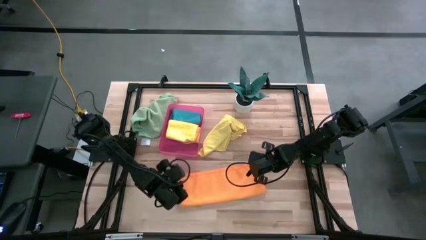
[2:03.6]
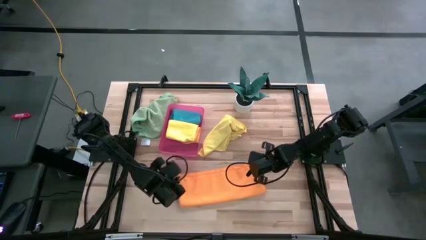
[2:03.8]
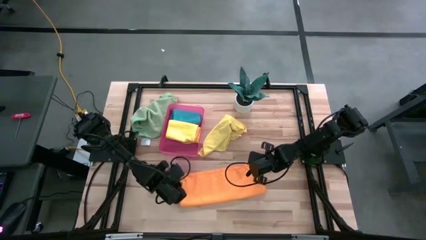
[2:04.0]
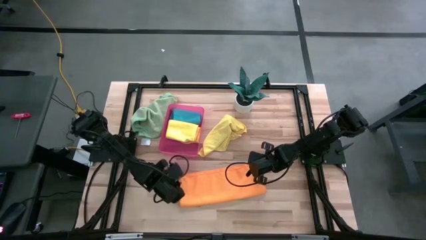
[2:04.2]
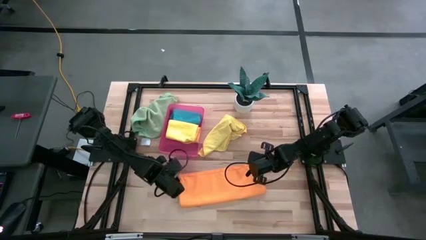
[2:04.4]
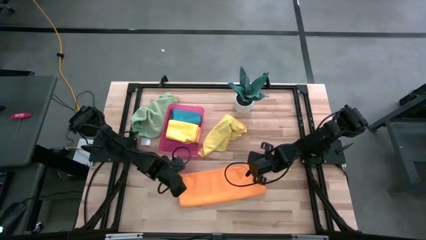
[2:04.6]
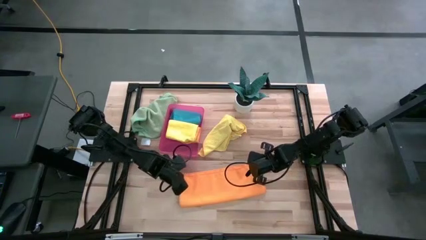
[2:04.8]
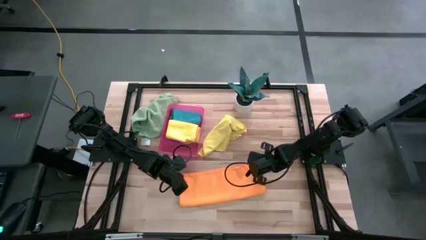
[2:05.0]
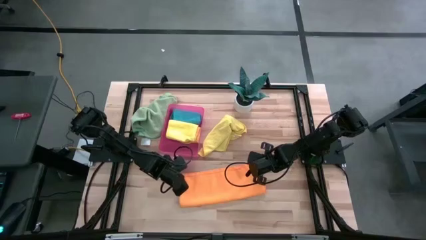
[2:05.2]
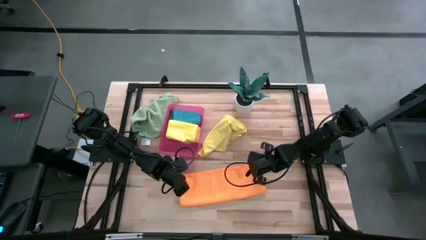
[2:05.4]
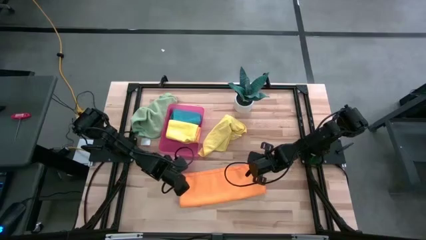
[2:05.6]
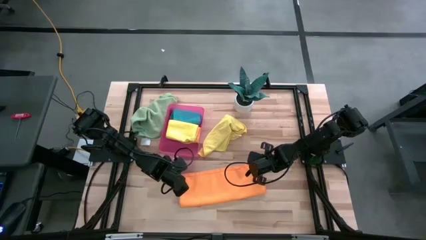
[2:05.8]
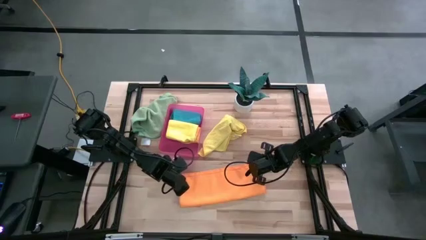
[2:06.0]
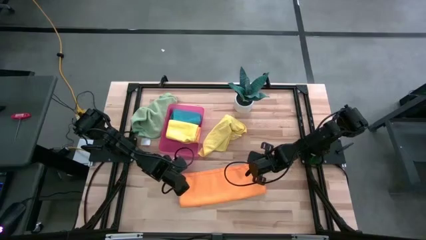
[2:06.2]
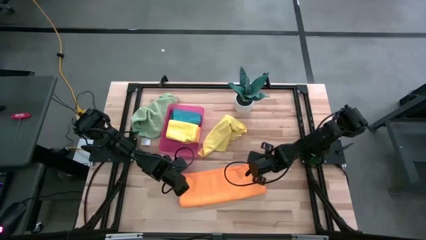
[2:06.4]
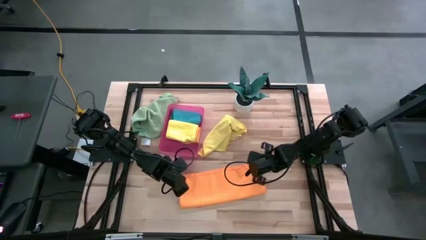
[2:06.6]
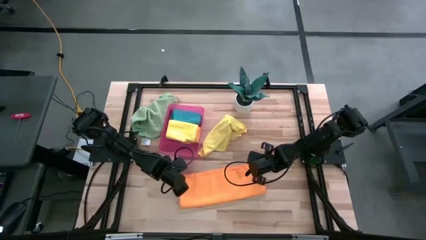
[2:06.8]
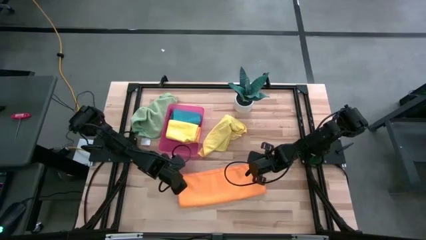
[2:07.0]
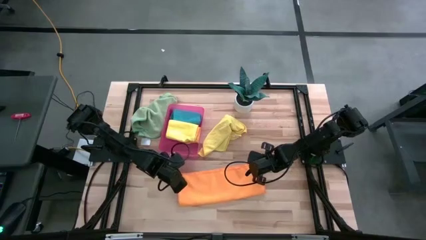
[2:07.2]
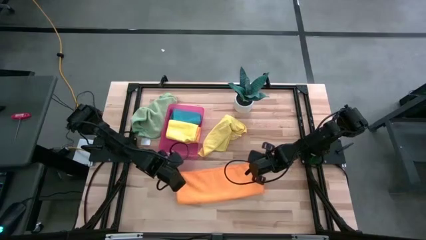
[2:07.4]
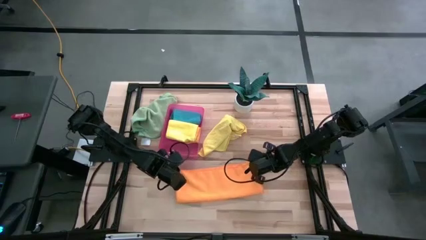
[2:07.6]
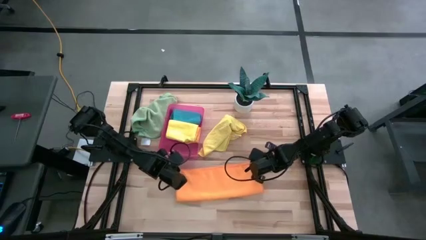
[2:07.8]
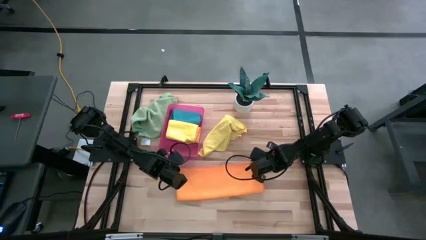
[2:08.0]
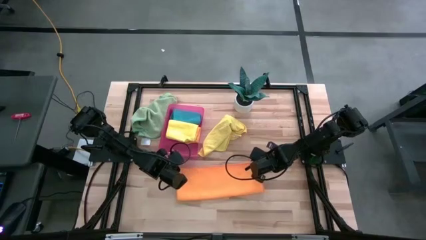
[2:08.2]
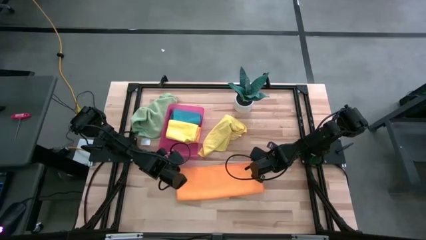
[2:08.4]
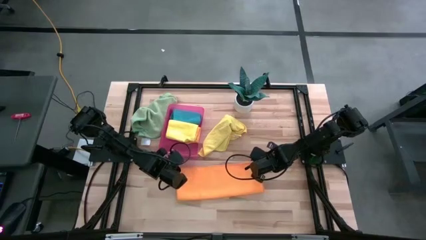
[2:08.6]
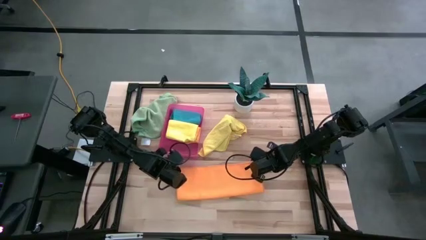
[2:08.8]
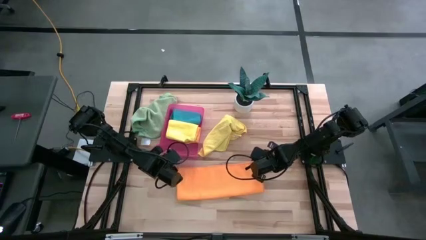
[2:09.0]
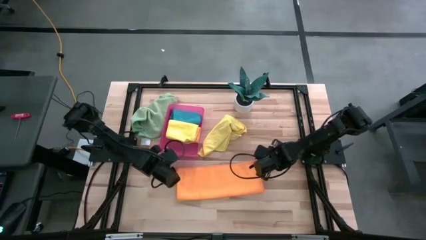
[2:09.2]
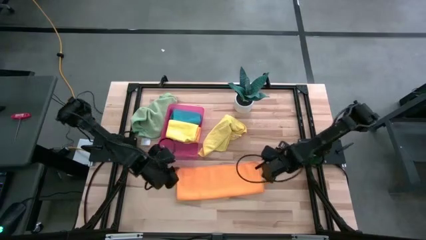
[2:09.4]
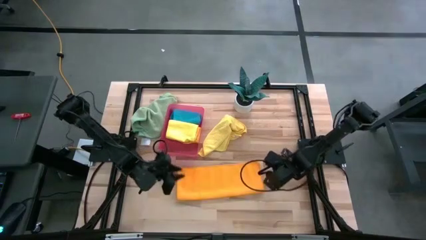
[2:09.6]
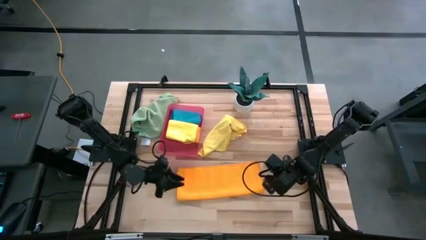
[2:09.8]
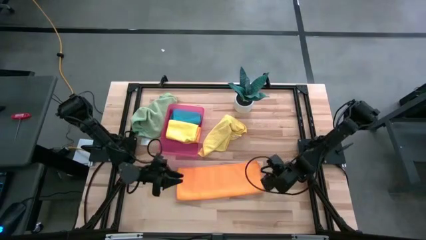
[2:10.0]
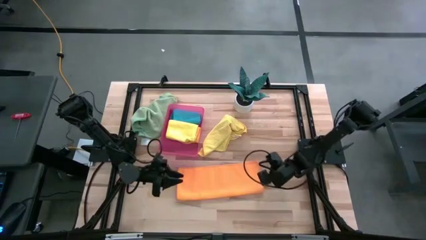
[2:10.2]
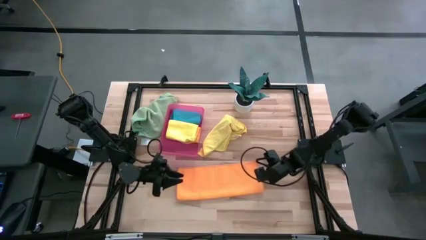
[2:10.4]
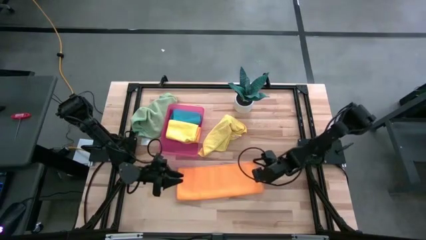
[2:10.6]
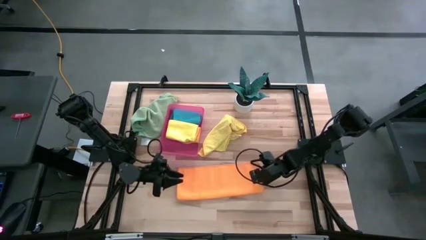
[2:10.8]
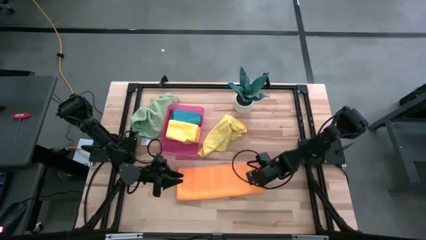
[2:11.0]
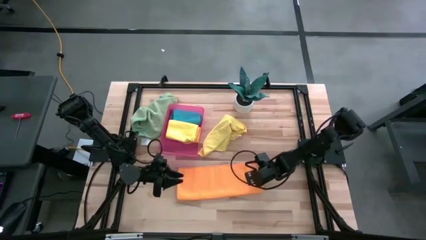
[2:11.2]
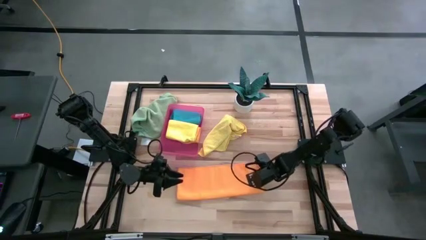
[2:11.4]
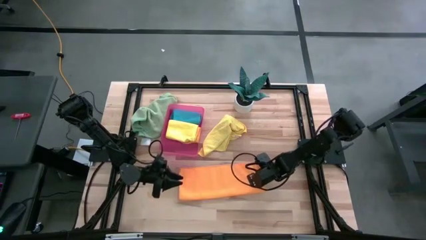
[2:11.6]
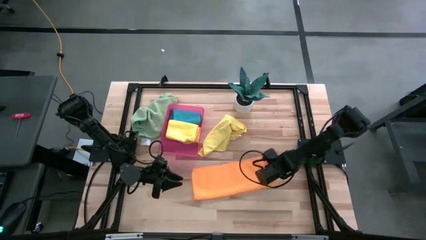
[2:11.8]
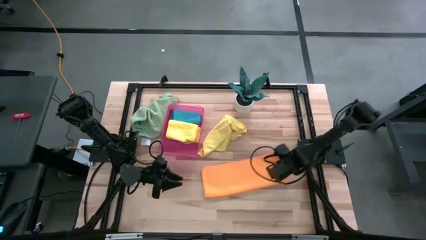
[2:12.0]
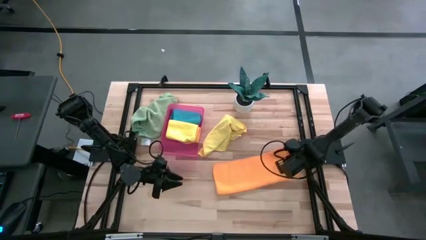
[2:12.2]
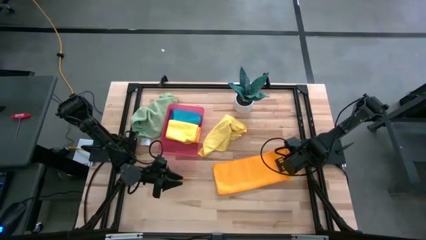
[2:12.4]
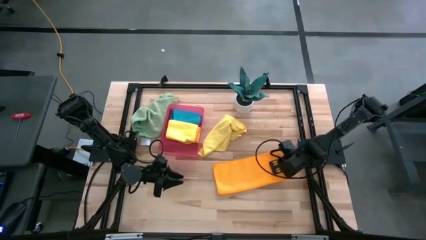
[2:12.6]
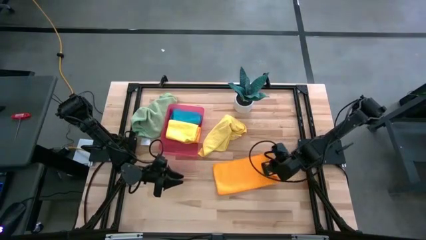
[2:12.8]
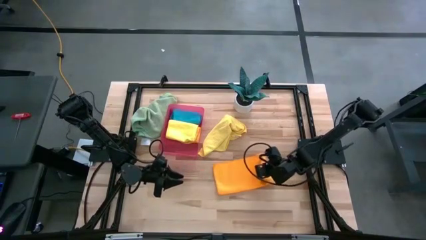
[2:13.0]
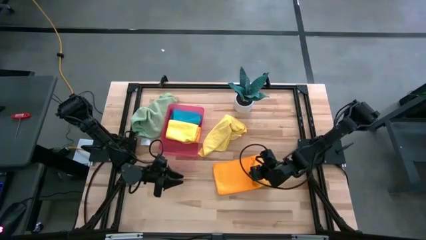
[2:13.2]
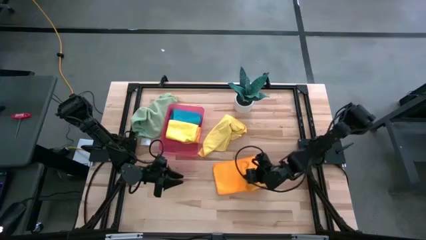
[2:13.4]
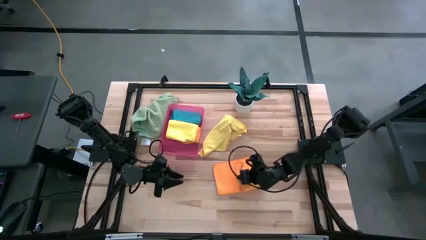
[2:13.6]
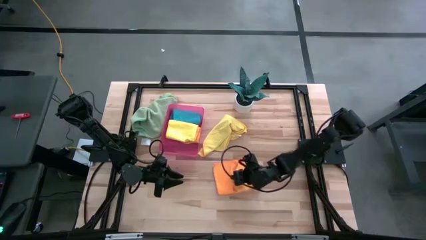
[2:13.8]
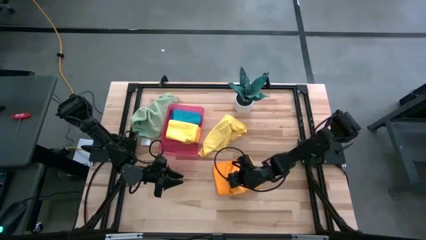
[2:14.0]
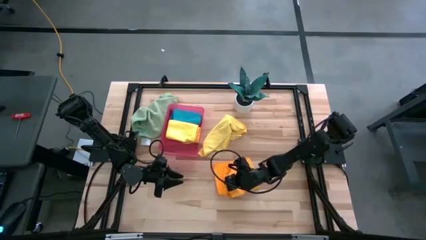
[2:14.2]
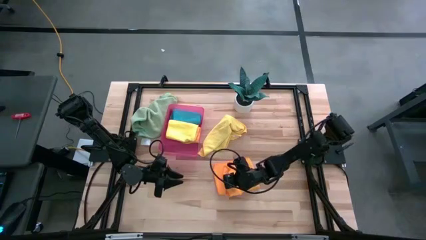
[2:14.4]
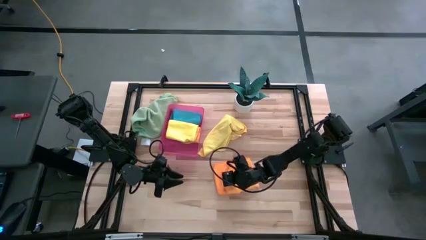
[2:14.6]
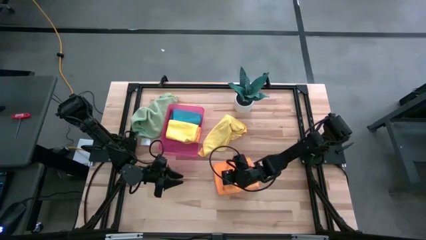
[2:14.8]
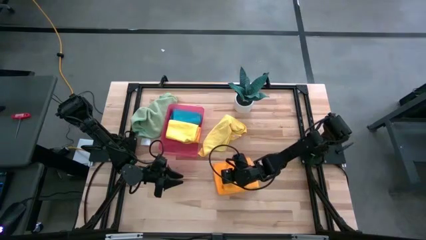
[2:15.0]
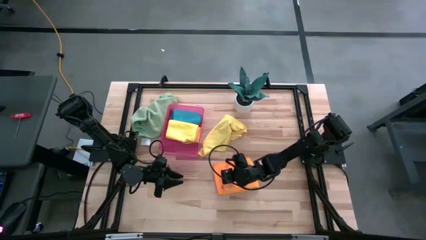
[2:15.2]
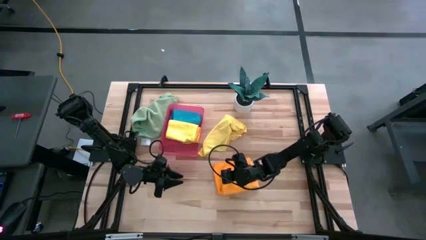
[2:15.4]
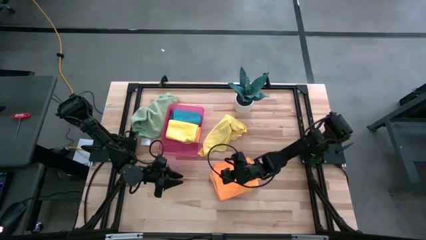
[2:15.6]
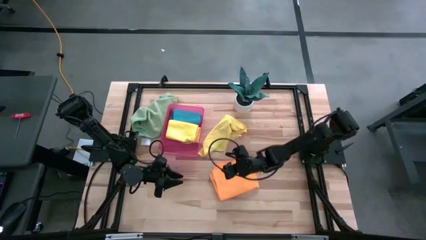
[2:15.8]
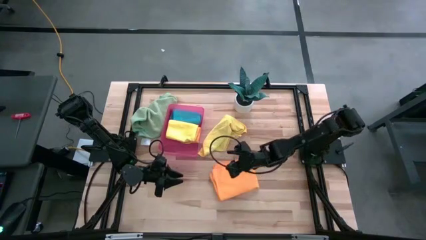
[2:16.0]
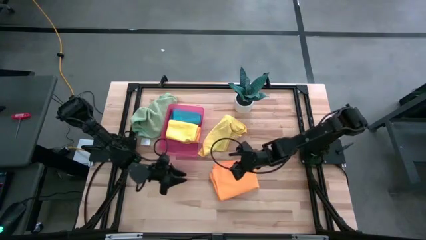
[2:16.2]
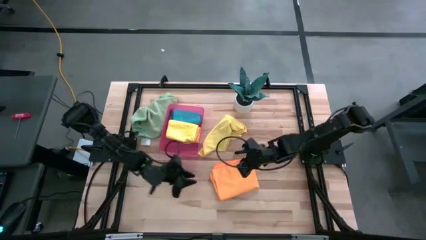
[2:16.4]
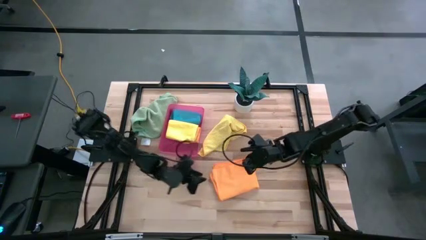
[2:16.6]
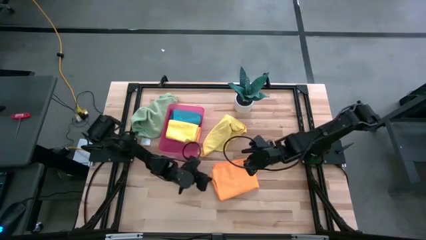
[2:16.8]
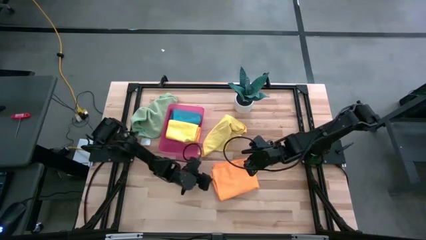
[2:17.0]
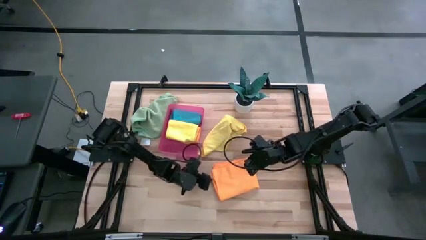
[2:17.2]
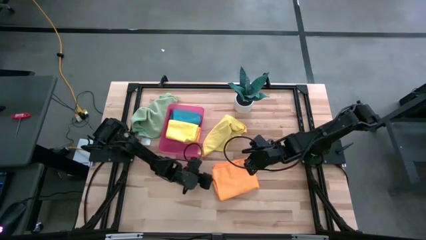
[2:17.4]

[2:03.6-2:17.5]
Task: Fold microfiber towels
Fold the orange microfiber cloth

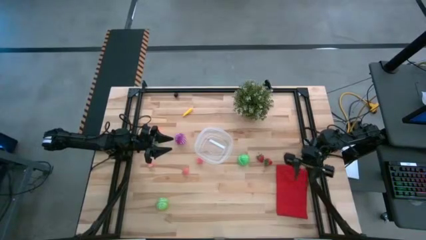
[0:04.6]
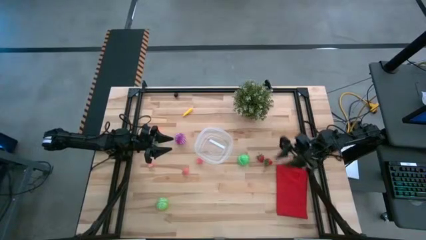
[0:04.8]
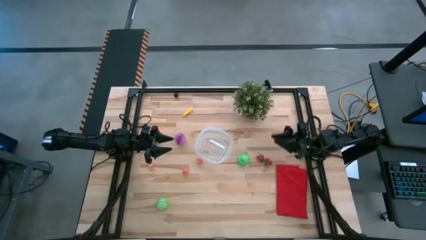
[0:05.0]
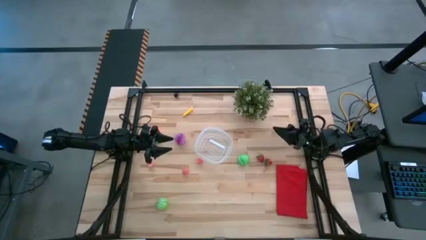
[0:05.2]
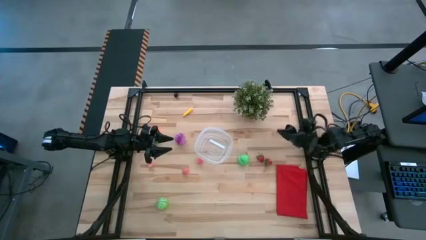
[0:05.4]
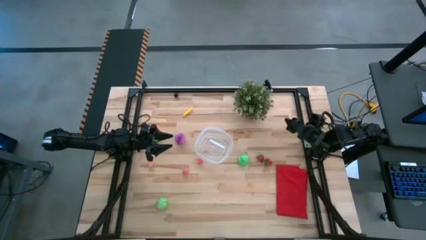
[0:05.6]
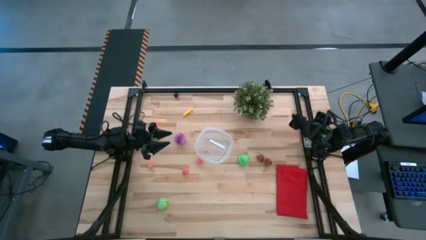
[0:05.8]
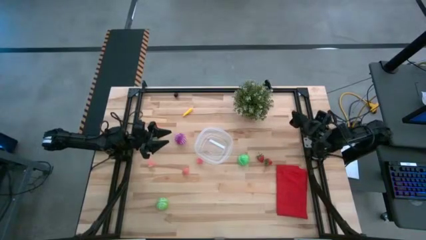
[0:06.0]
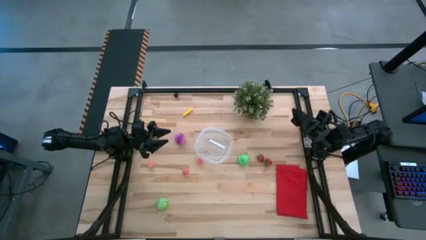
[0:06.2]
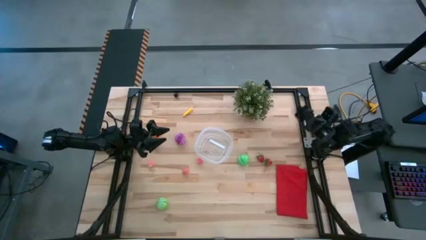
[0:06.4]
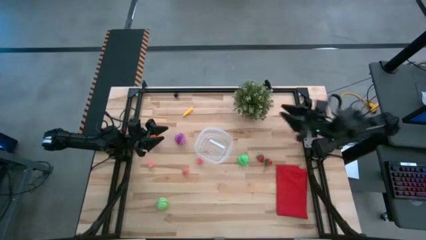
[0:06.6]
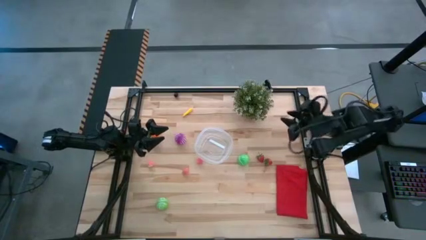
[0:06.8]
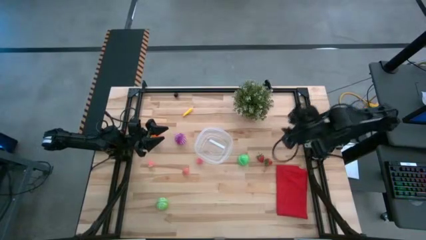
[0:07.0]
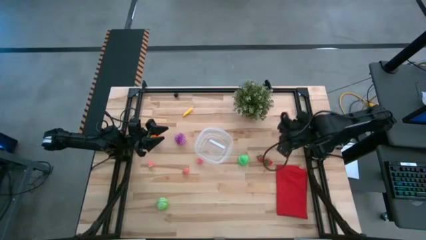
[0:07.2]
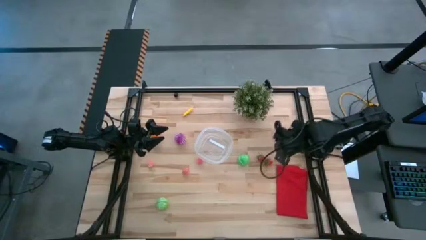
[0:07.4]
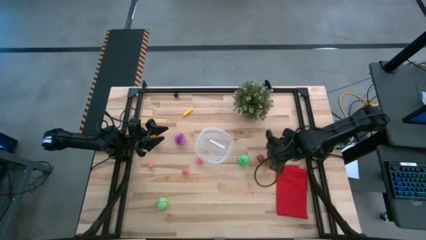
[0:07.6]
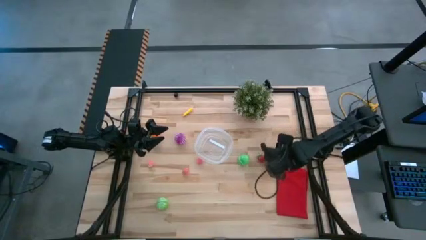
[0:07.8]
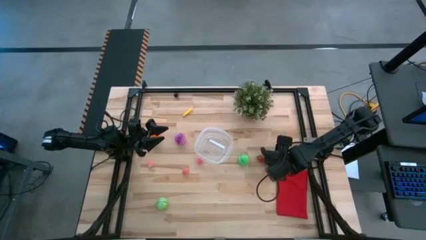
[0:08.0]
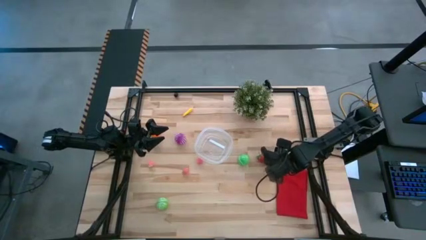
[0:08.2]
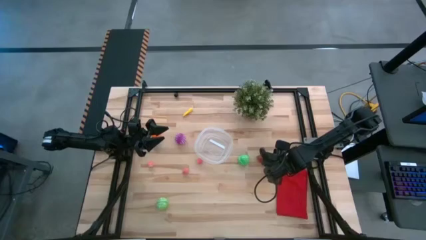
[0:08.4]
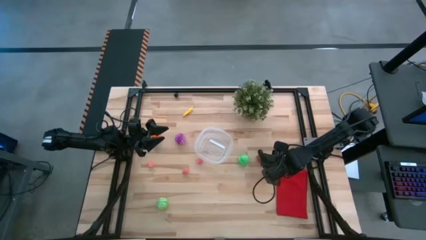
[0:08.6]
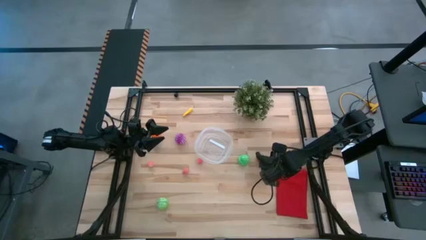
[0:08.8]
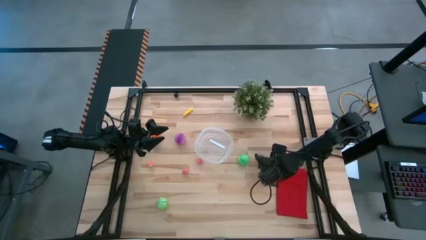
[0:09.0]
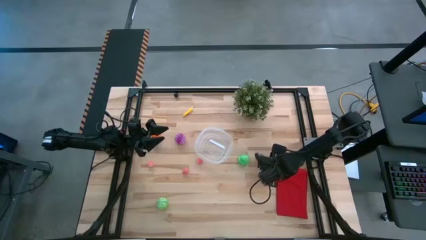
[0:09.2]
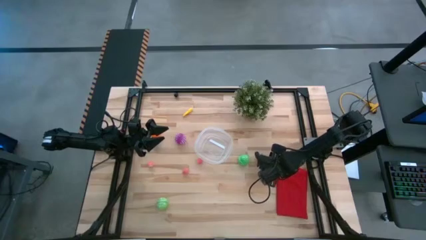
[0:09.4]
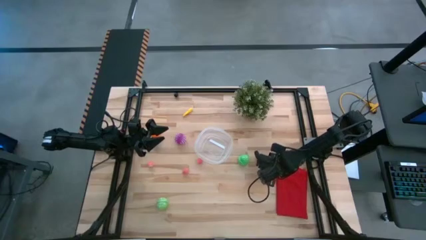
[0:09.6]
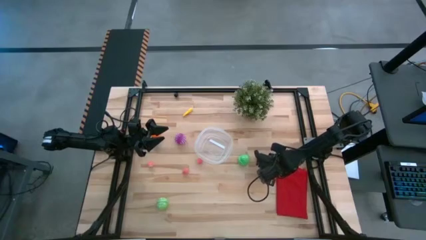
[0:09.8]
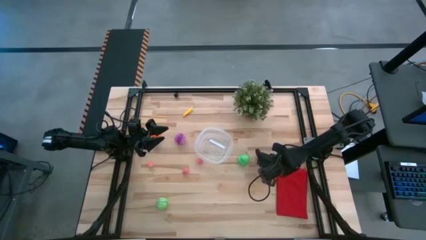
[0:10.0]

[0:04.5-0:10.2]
Task: Pick and placing Produce into tupperware
Put the right red strawberry into the transparent bin
